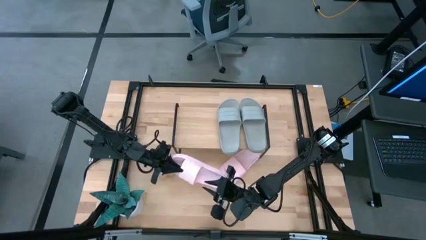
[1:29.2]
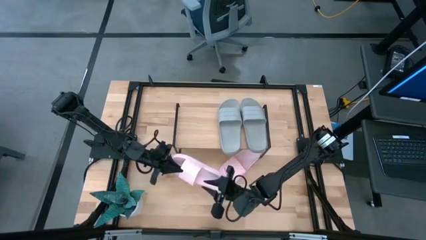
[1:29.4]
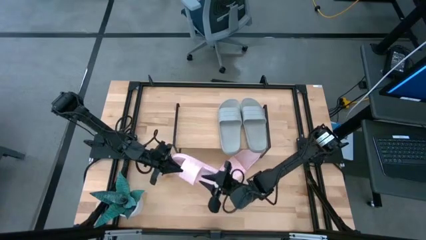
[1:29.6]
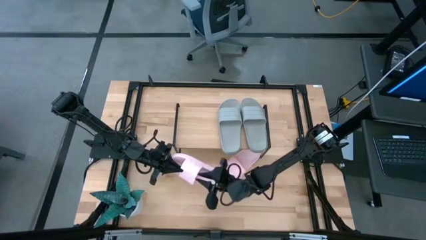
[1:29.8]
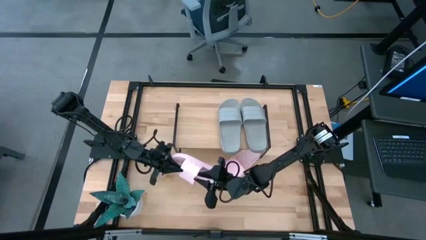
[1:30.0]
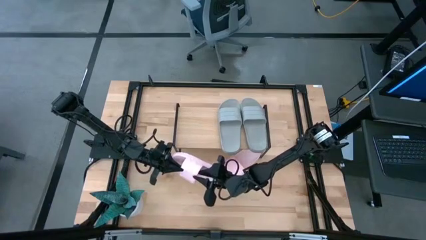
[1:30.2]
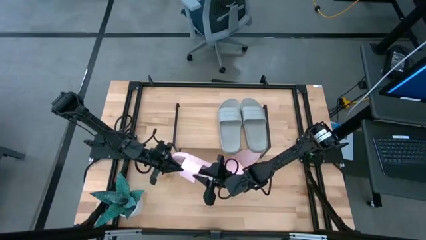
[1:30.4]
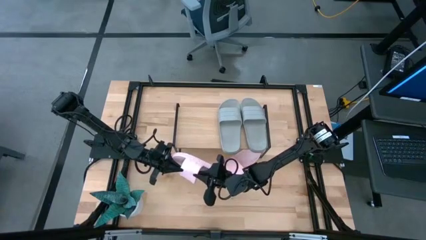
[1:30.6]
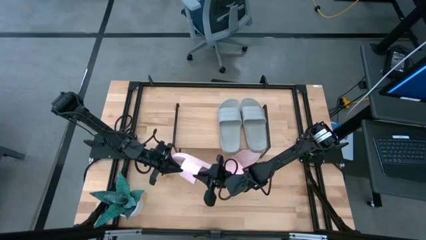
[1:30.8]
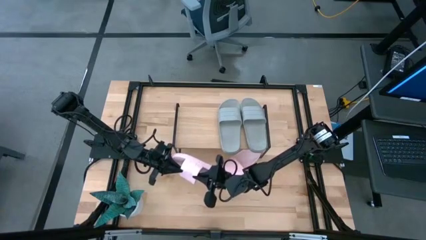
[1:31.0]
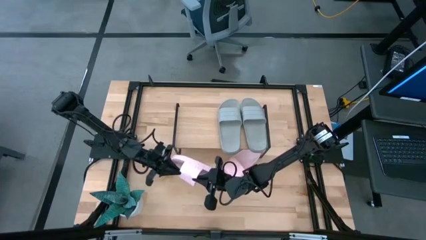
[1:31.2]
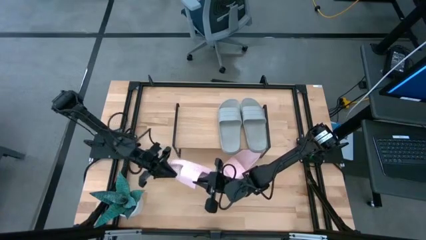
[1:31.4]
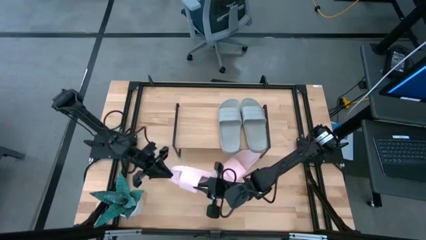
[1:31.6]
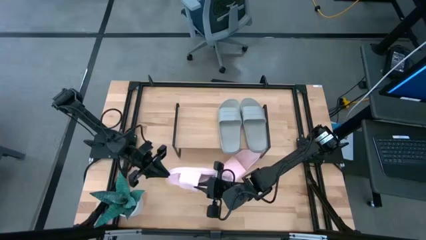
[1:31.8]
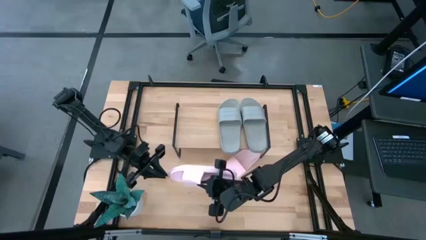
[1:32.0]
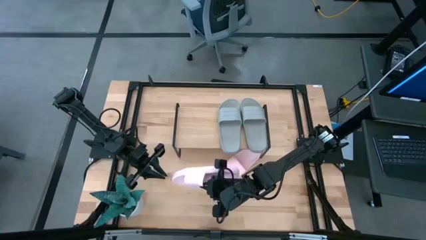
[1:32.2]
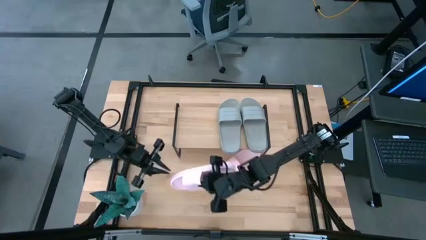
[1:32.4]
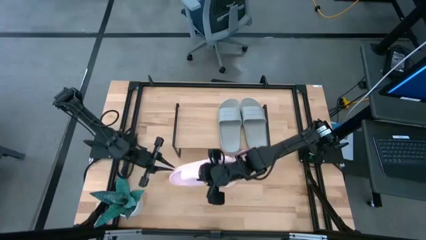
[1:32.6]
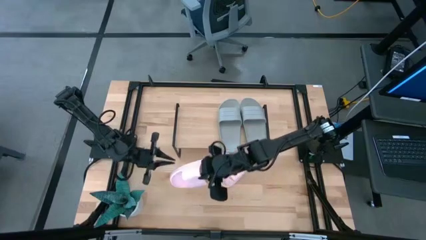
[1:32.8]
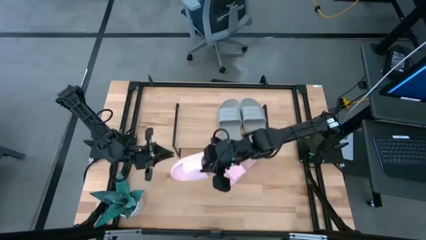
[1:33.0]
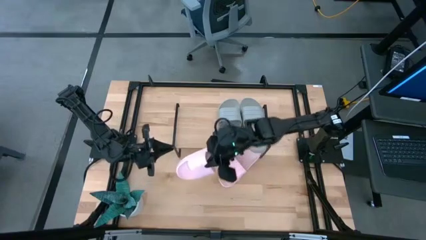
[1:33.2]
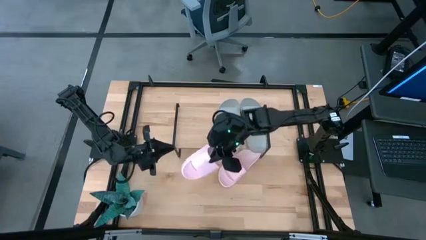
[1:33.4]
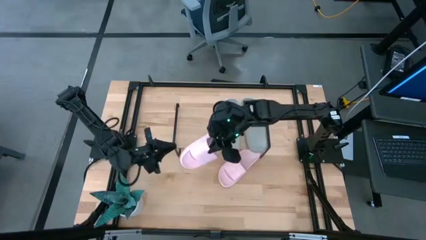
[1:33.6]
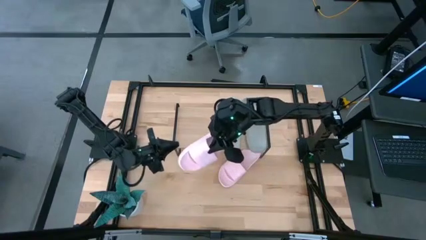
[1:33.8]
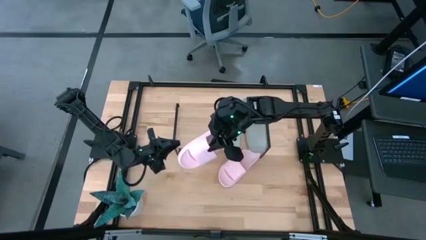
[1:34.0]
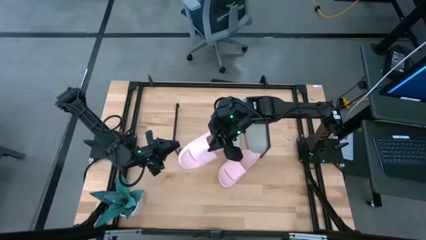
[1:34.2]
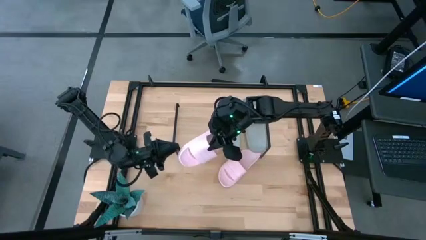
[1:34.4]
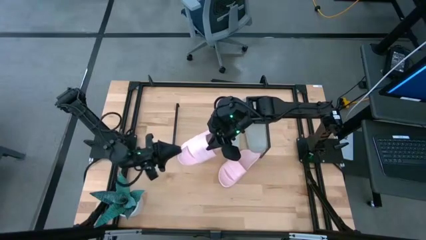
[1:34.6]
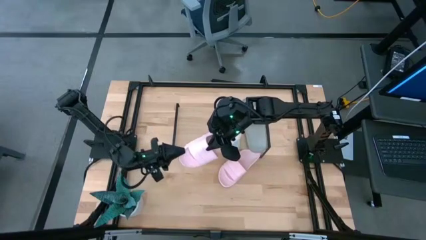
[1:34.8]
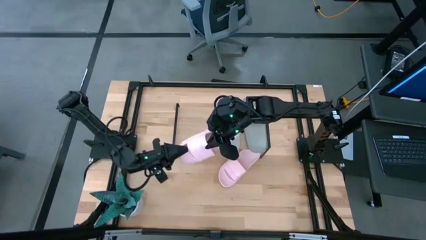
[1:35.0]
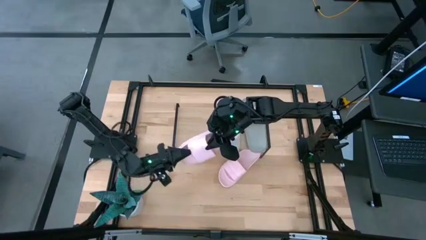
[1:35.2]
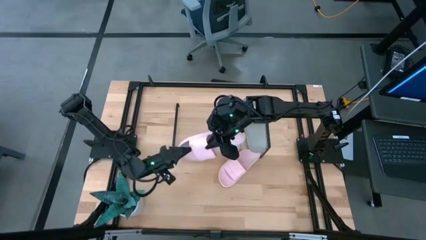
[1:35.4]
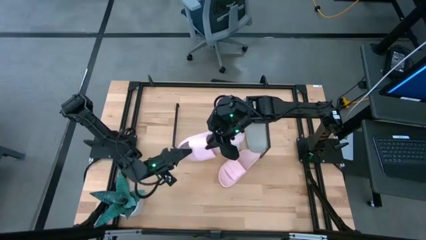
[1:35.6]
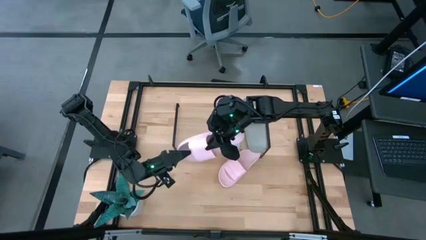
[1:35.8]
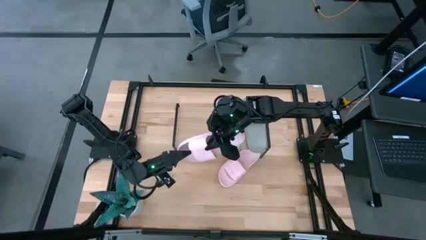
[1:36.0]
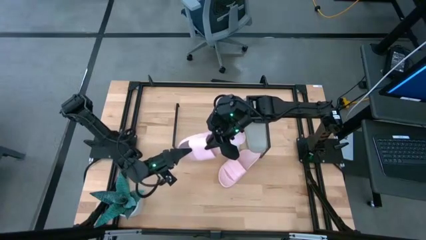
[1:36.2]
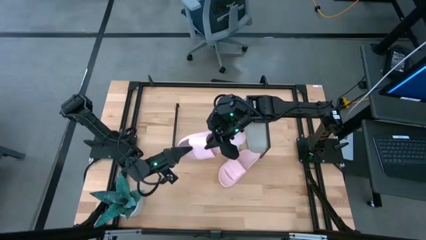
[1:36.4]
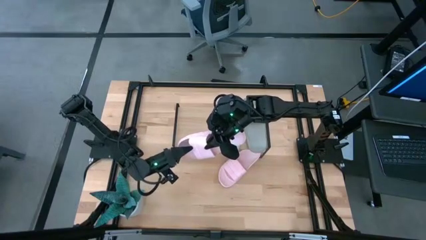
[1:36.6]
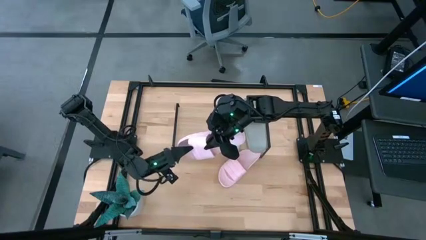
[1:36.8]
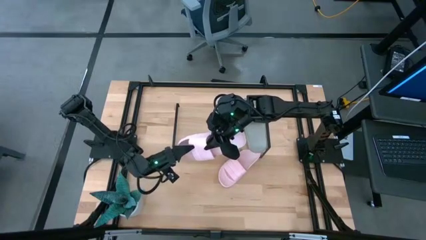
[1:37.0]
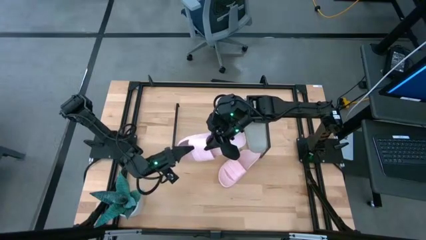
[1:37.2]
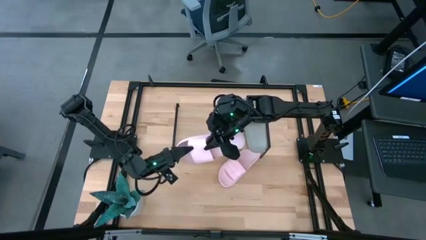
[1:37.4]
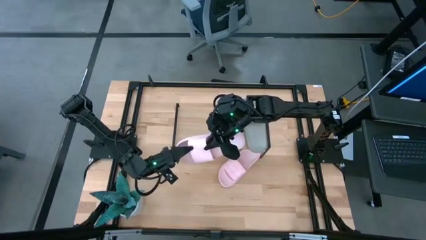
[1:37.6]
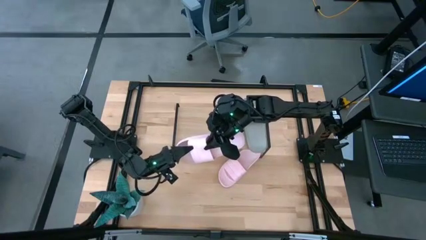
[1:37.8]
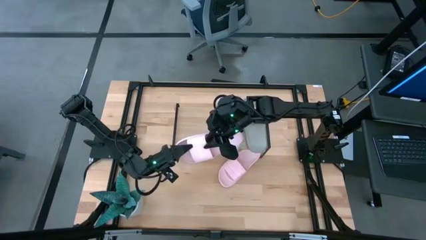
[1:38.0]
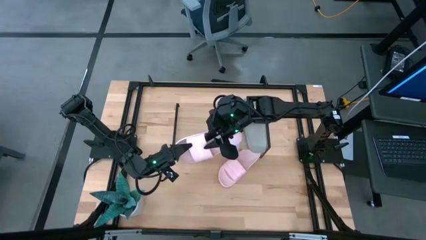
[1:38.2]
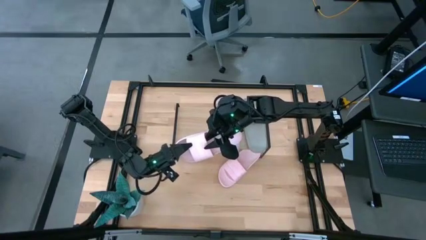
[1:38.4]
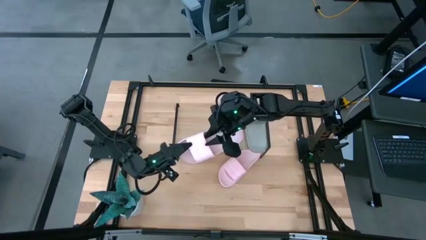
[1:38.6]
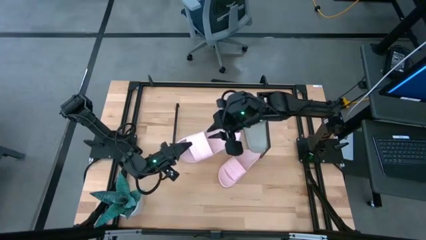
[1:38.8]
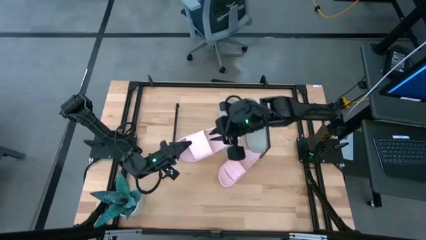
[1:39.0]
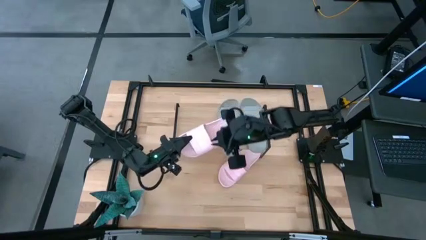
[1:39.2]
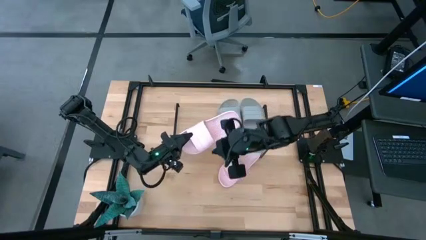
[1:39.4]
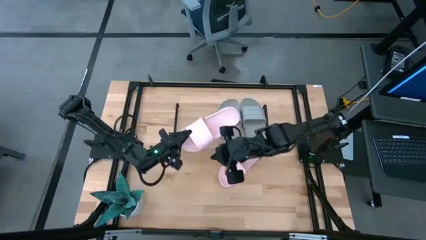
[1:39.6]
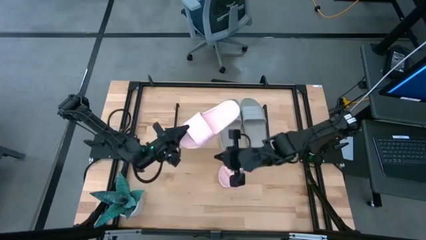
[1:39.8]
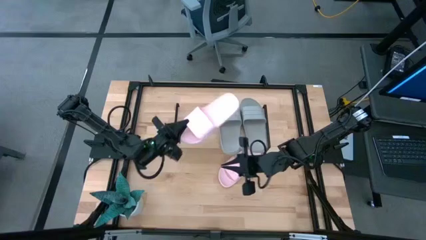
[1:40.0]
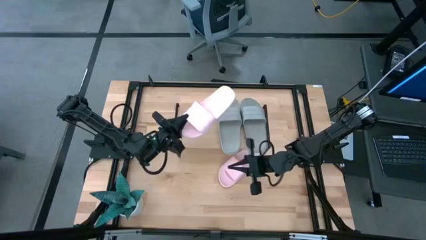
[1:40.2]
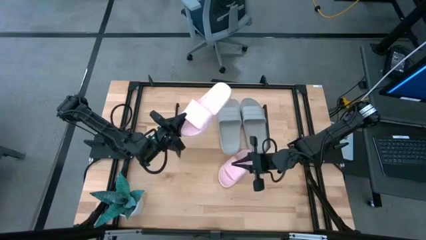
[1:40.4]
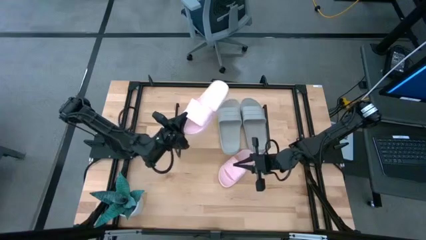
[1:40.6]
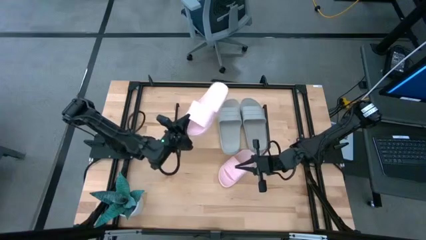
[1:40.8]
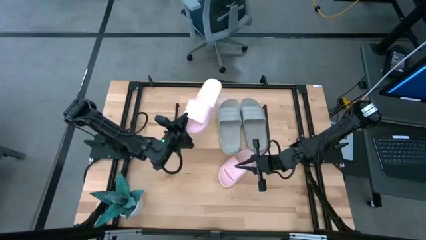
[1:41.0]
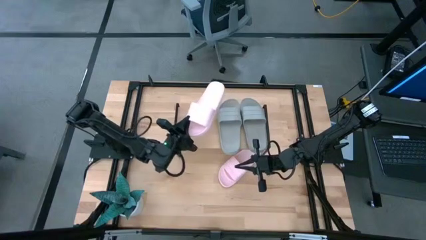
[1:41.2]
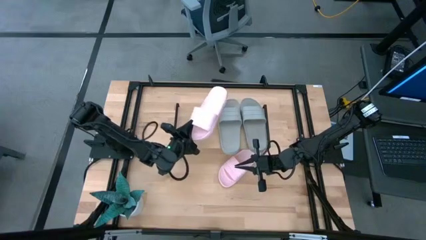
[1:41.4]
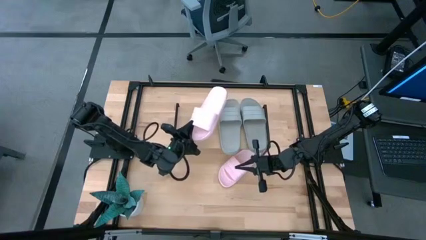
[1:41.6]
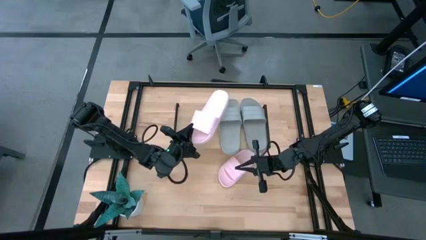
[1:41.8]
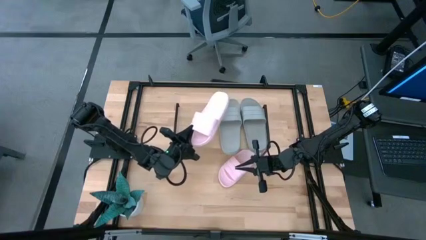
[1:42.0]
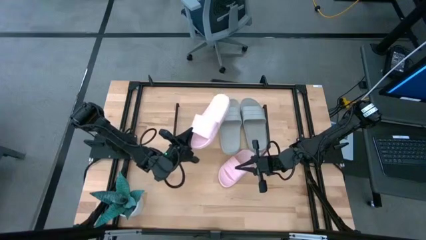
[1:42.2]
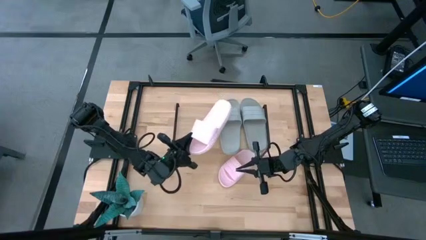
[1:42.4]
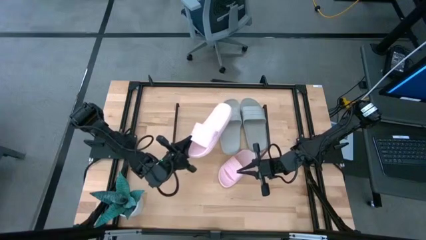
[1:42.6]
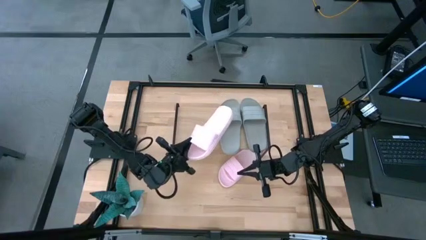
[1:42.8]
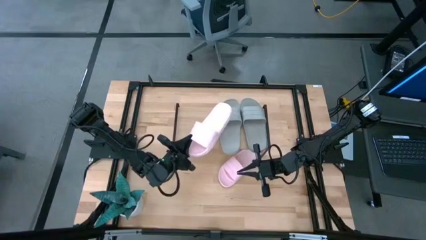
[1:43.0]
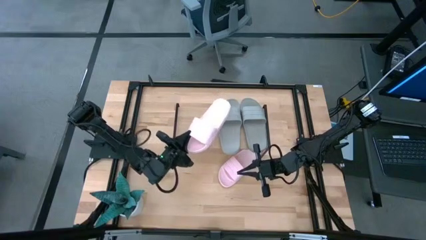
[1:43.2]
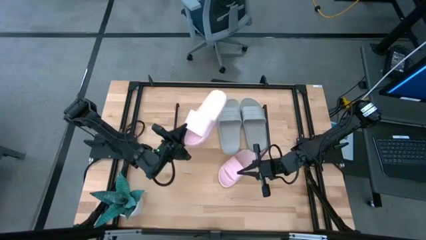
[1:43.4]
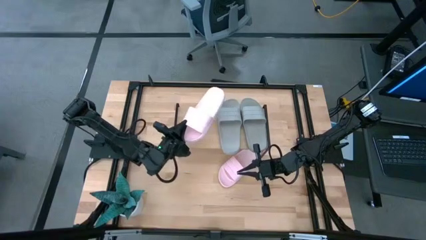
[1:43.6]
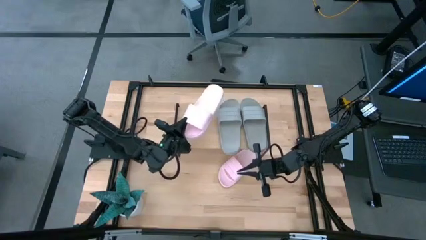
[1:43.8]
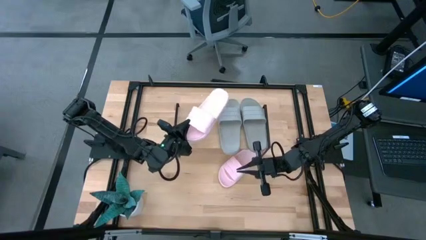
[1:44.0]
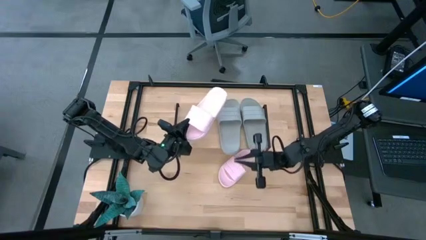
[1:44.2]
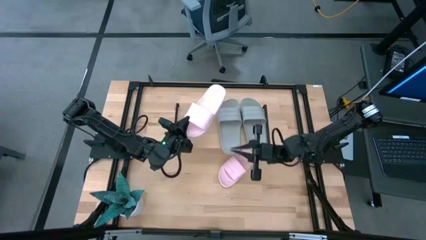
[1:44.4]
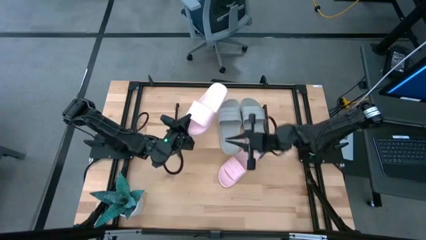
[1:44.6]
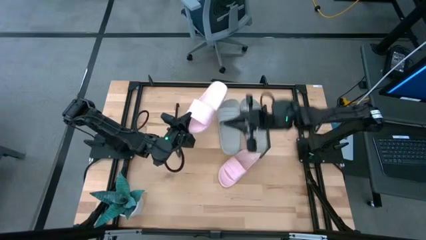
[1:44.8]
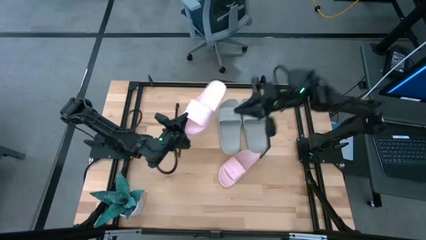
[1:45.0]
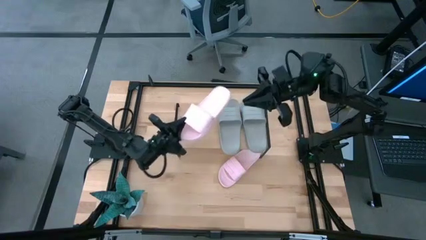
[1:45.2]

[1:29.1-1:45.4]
Task: Pick and place slides into the shelf
Put the left pink slide on the shelf
